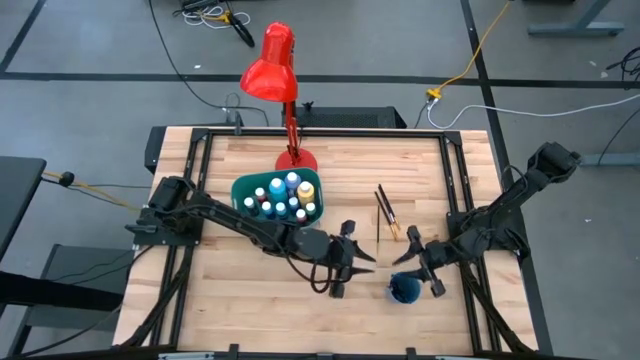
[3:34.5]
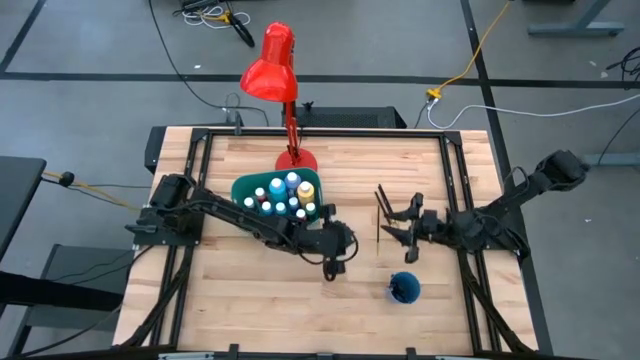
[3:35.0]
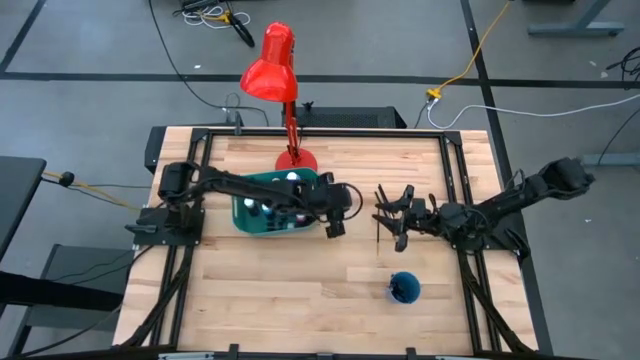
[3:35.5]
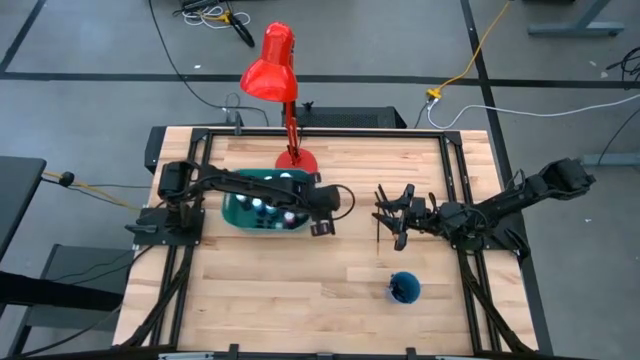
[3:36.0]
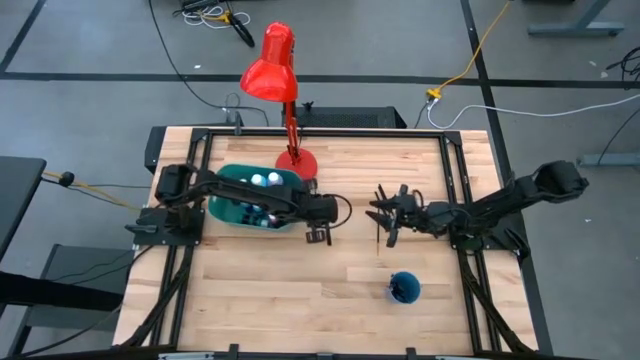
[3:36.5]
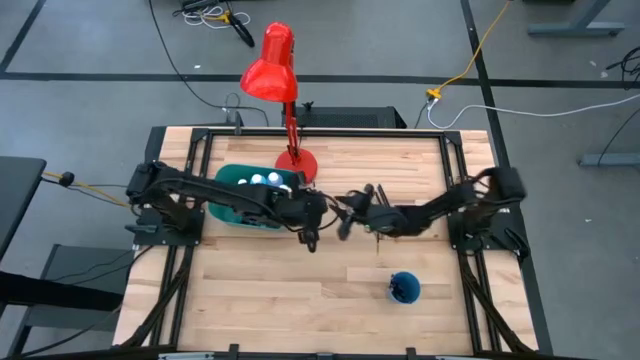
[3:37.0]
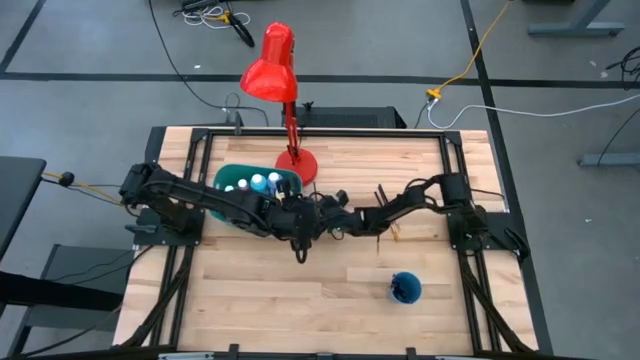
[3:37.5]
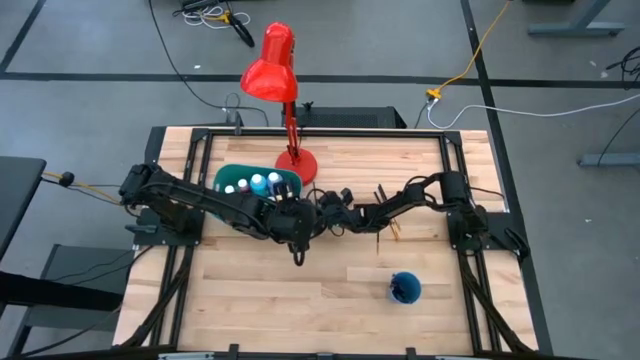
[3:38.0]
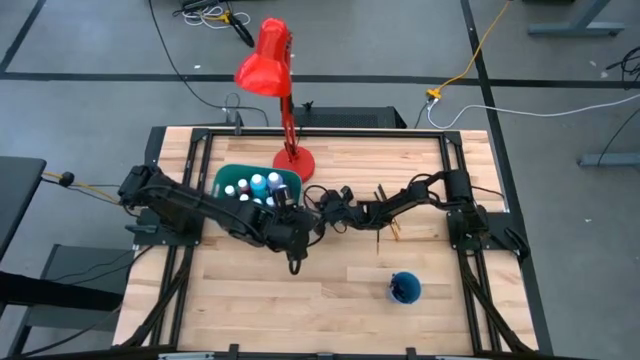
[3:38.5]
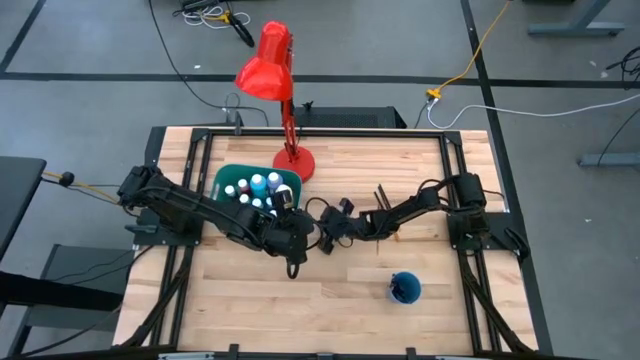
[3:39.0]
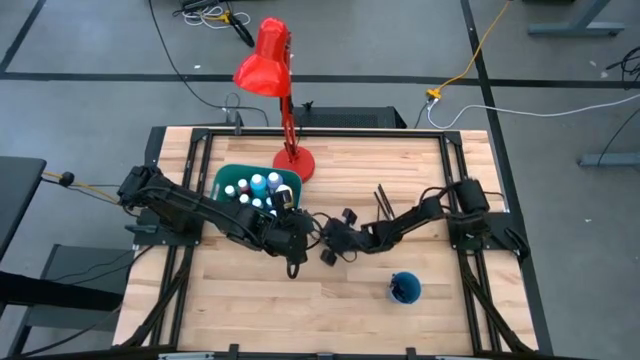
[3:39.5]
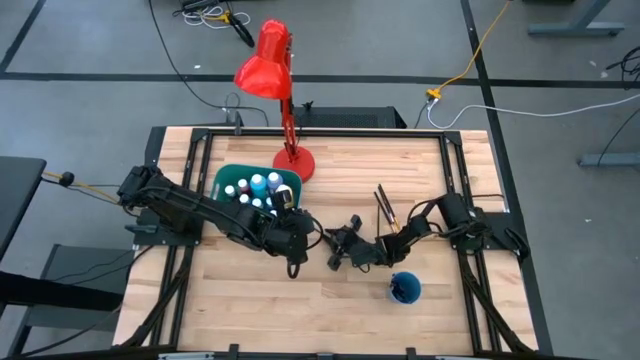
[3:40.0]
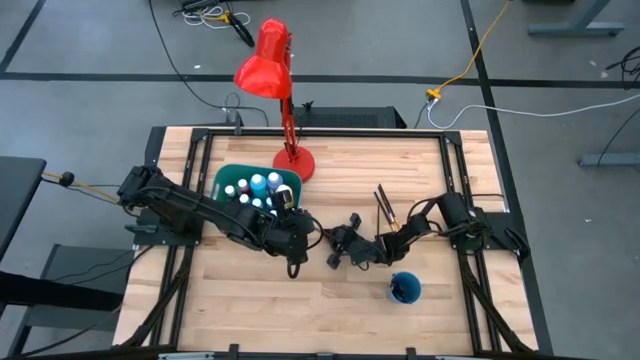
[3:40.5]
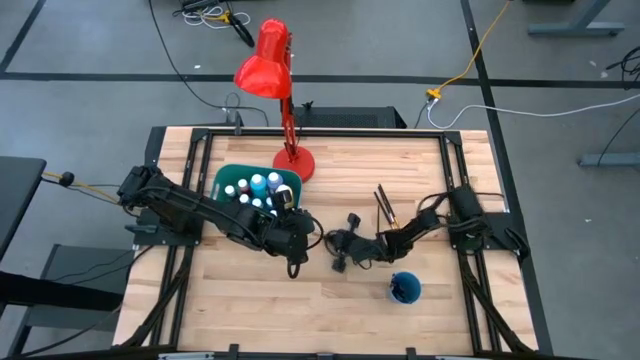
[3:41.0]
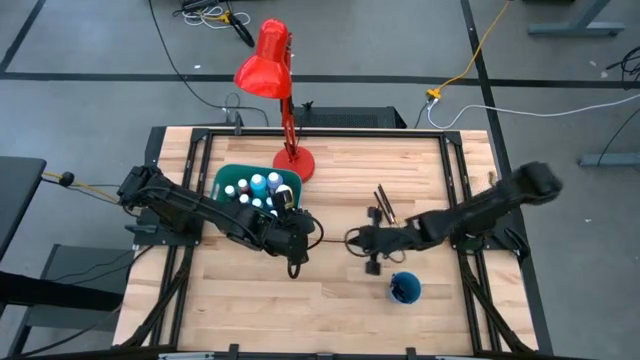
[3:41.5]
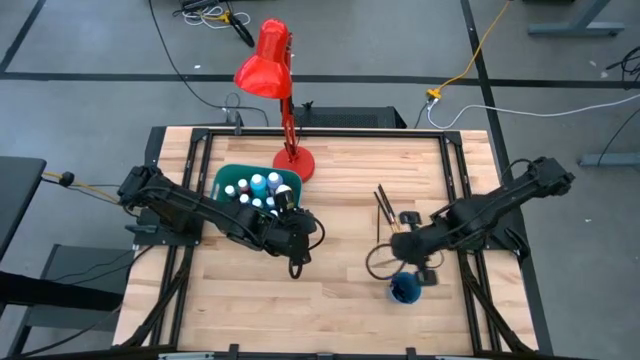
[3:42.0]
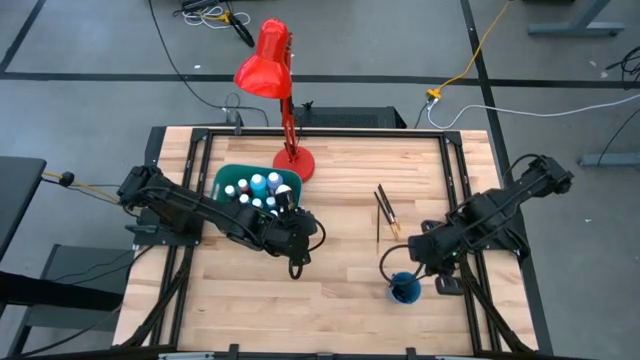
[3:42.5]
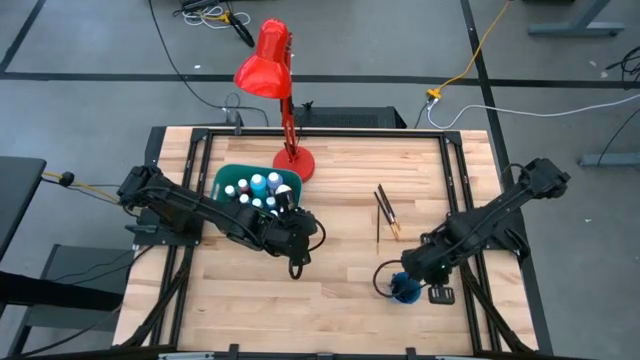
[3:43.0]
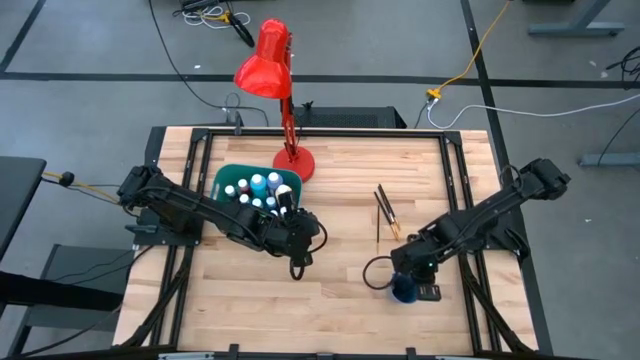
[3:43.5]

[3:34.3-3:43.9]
Task: Pick & Place Paint Supplies
Put the gold paint brush into the blue cup

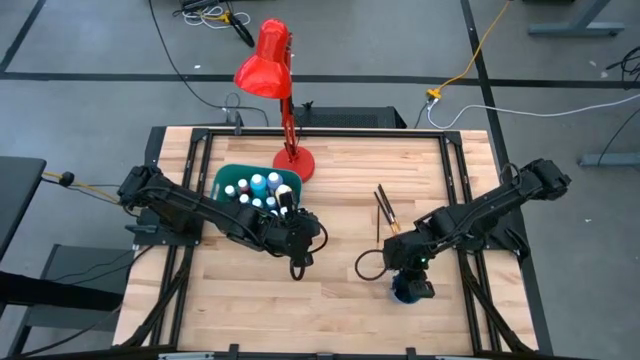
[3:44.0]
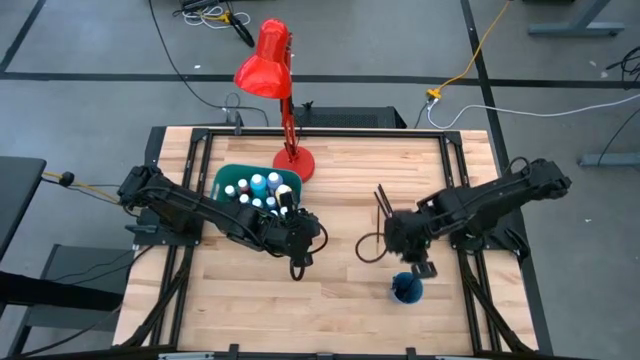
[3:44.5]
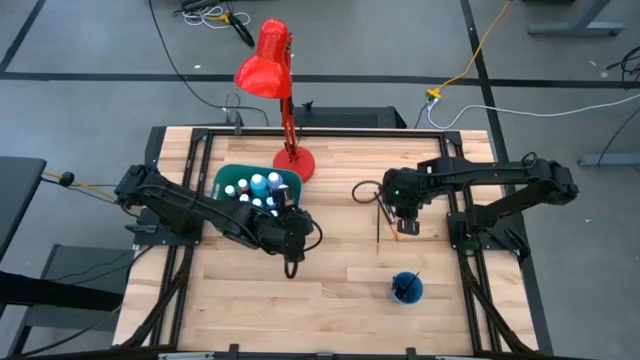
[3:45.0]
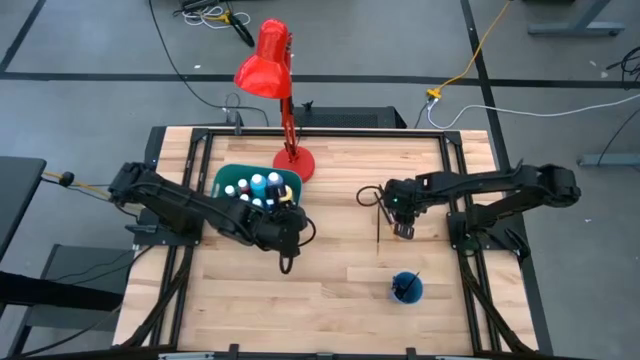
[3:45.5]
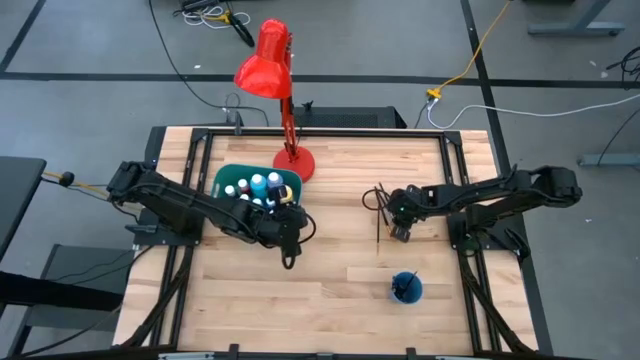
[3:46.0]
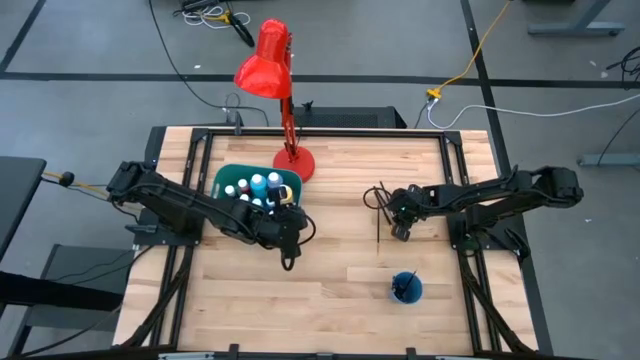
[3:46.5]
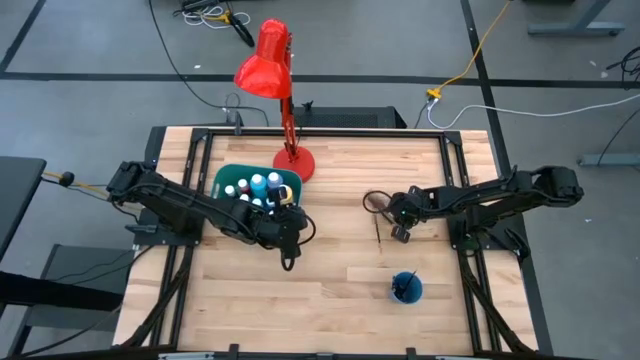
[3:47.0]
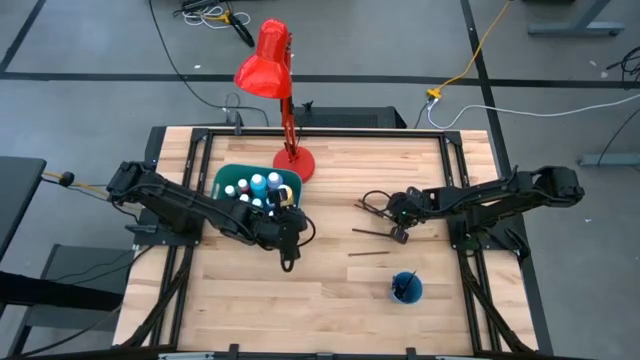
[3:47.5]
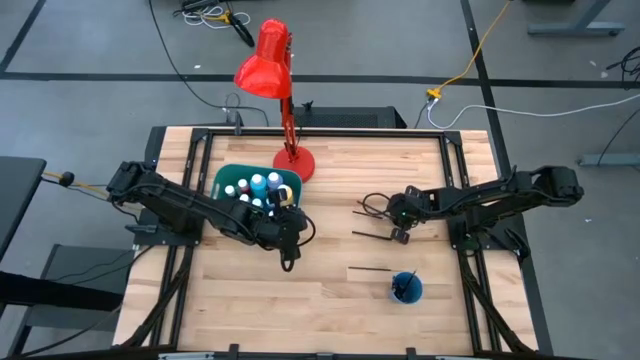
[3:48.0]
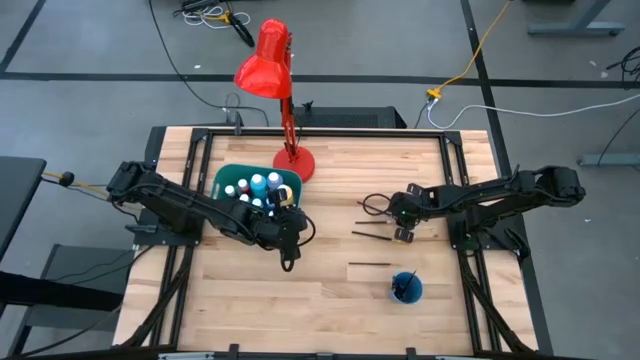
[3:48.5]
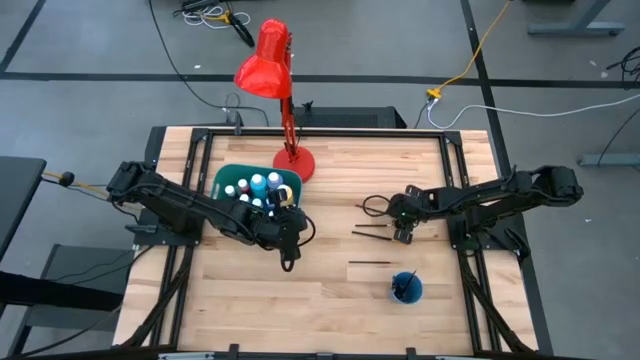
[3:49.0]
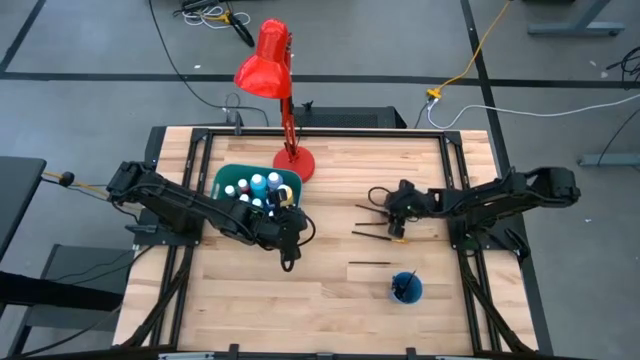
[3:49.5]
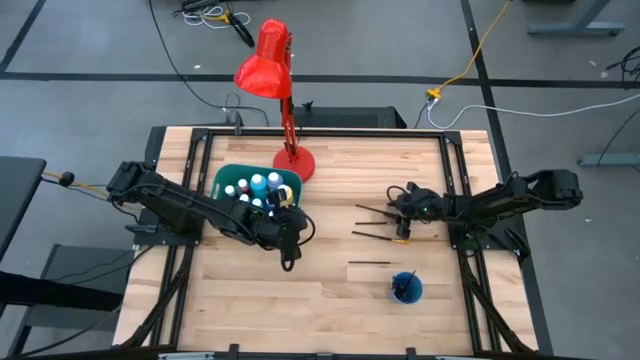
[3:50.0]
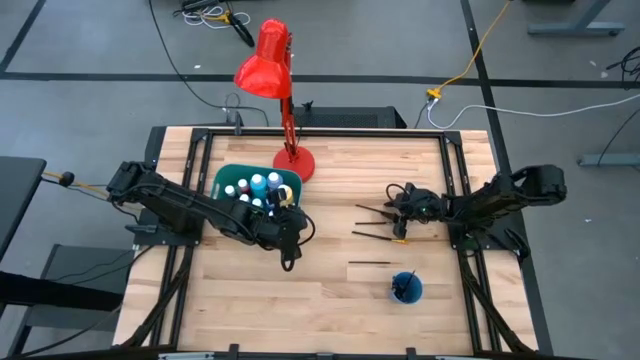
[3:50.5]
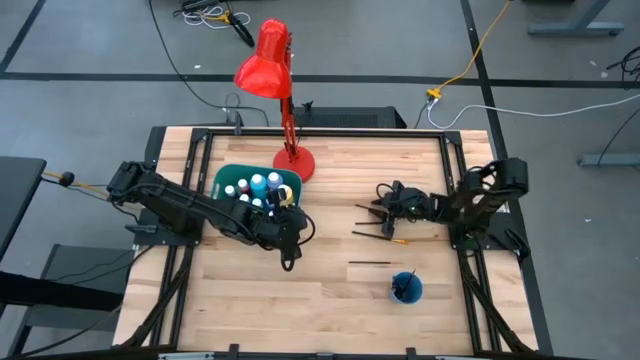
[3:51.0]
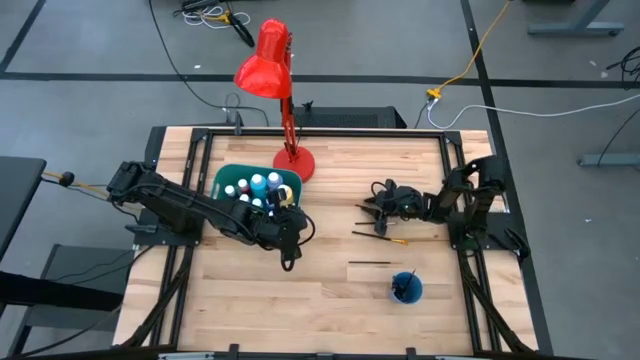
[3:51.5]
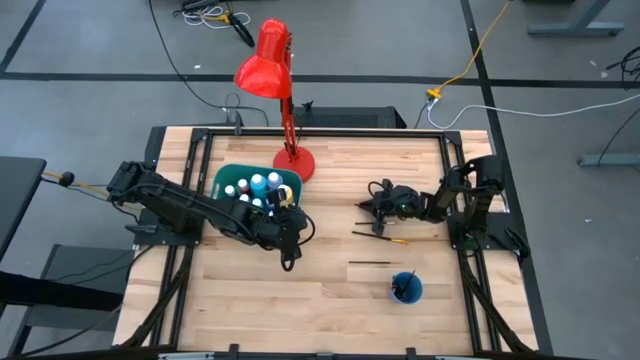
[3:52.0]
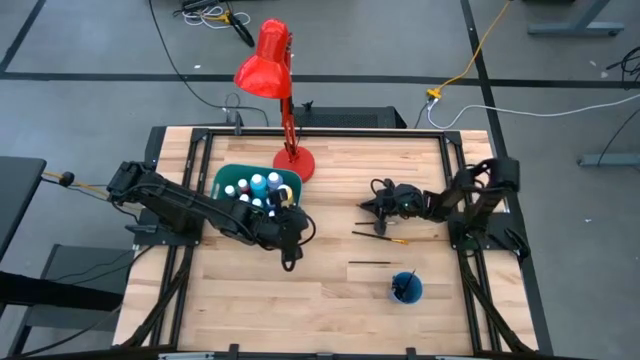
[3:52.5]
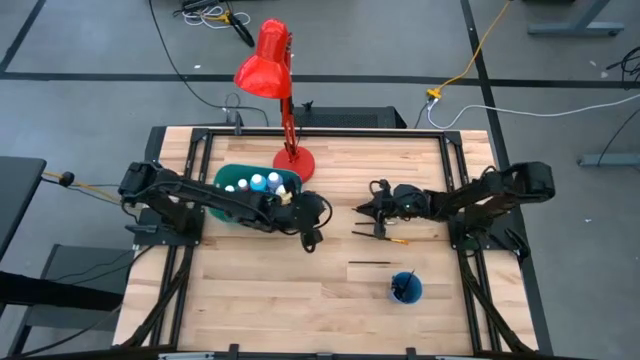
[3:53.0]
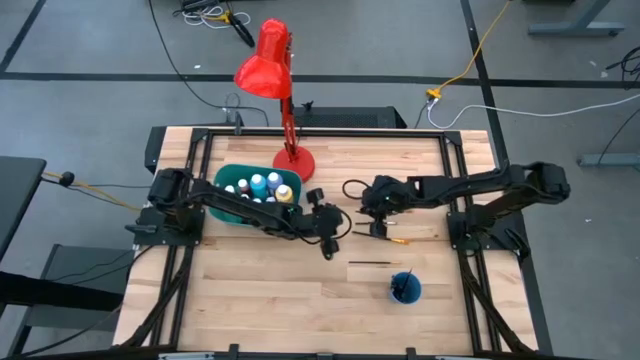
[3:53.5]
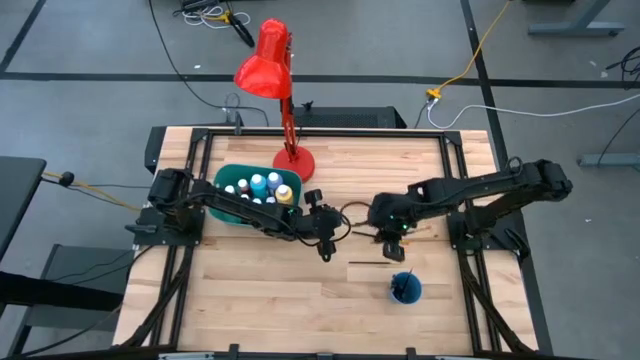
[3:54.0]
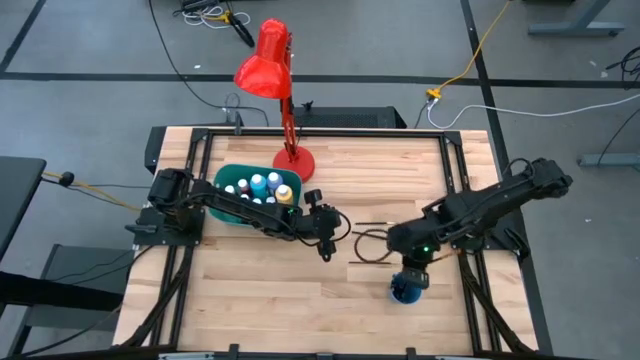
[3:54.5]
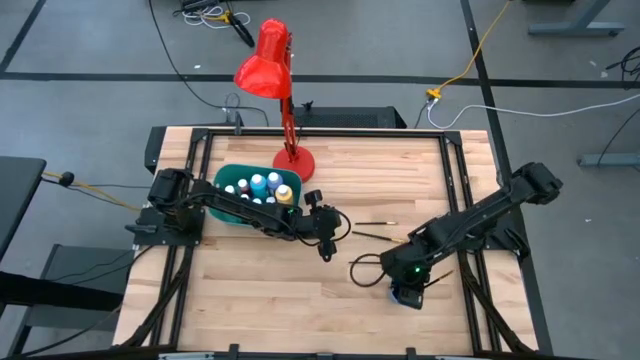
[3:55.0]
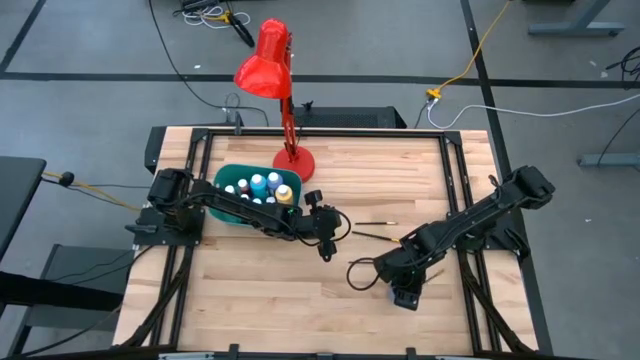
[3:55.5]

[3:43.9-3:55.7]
Put the gold paint brush into the blue cup
